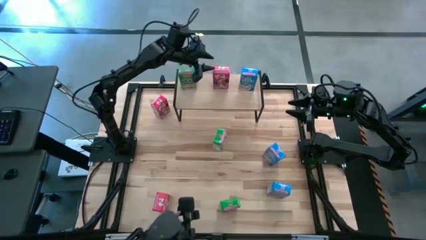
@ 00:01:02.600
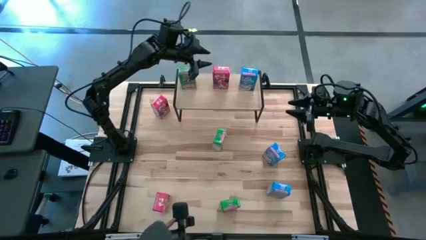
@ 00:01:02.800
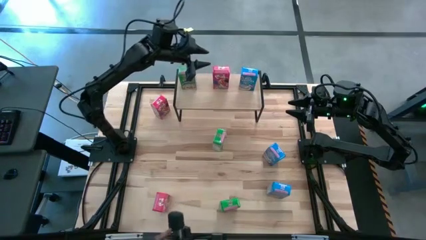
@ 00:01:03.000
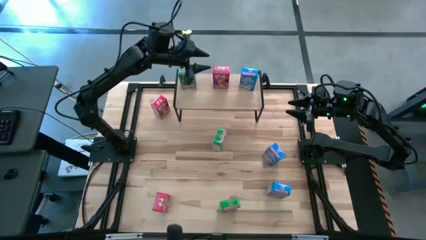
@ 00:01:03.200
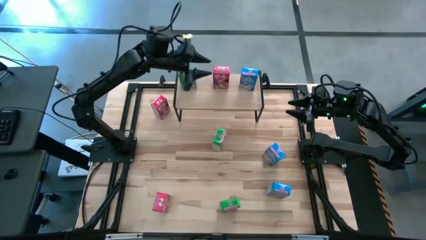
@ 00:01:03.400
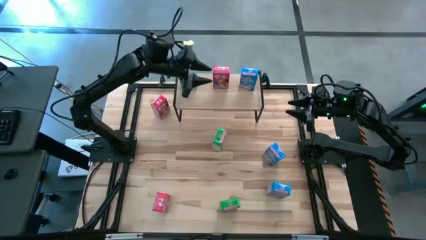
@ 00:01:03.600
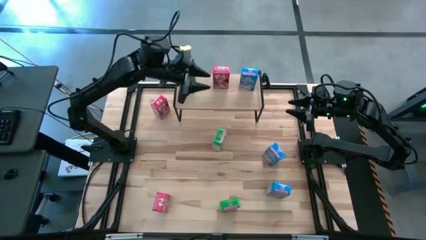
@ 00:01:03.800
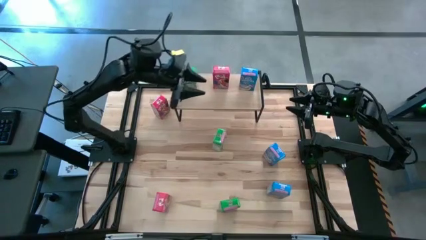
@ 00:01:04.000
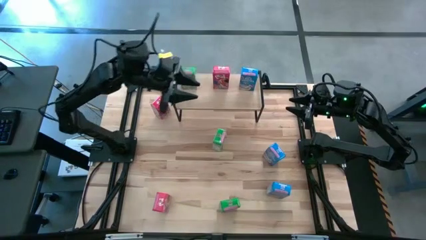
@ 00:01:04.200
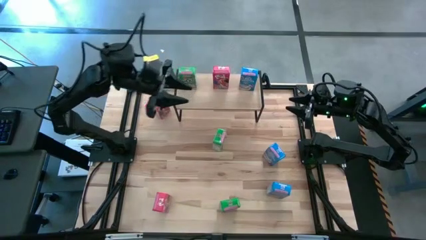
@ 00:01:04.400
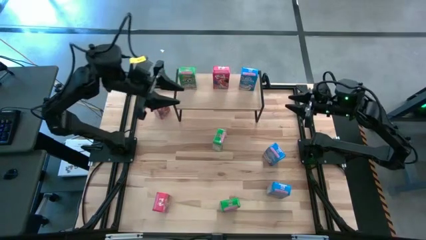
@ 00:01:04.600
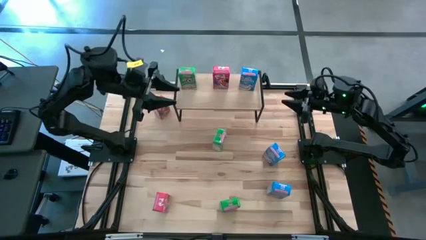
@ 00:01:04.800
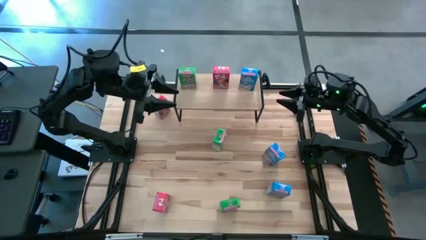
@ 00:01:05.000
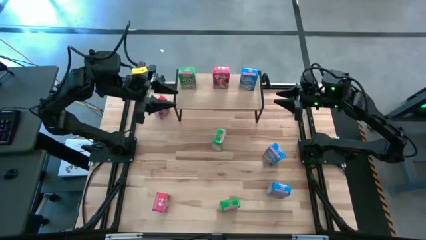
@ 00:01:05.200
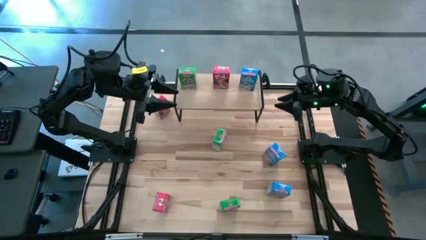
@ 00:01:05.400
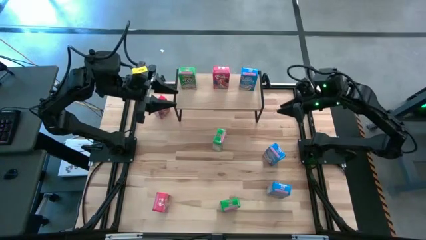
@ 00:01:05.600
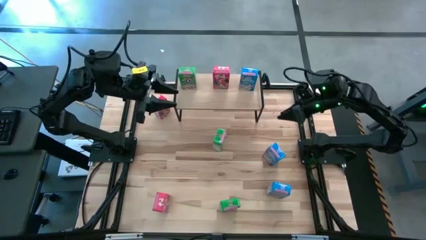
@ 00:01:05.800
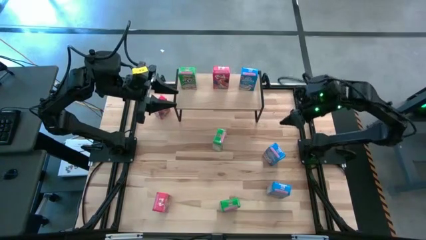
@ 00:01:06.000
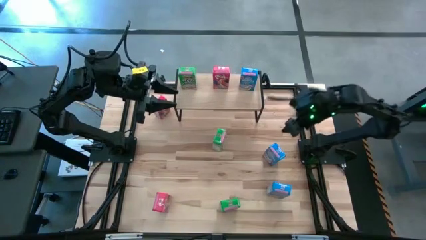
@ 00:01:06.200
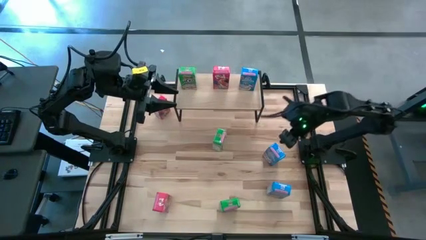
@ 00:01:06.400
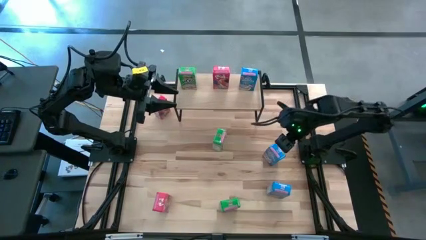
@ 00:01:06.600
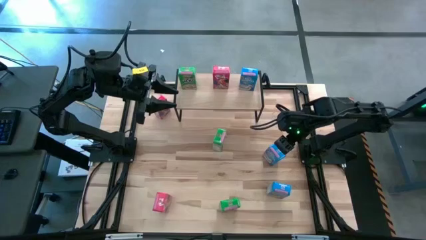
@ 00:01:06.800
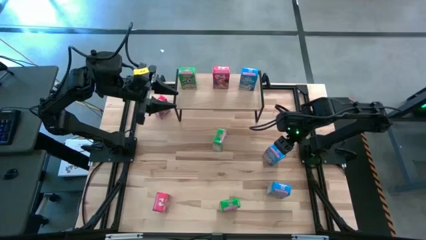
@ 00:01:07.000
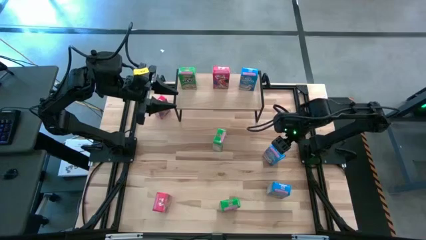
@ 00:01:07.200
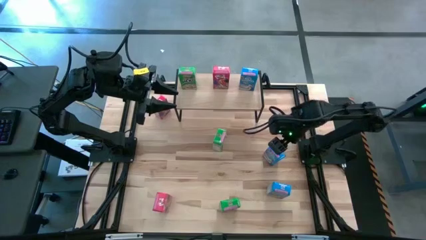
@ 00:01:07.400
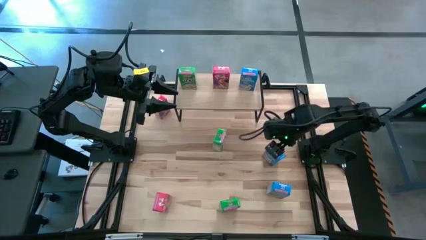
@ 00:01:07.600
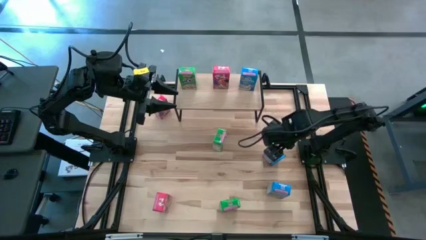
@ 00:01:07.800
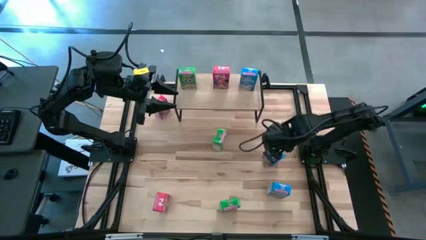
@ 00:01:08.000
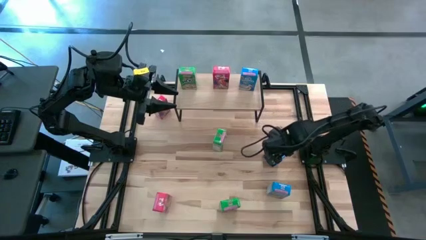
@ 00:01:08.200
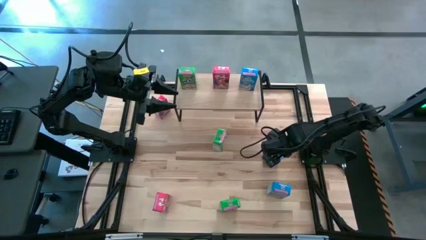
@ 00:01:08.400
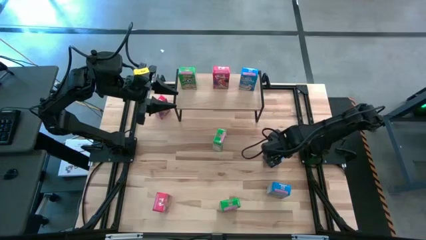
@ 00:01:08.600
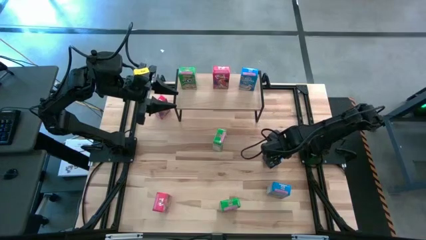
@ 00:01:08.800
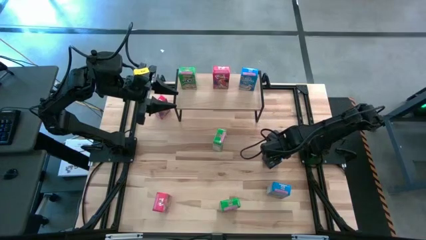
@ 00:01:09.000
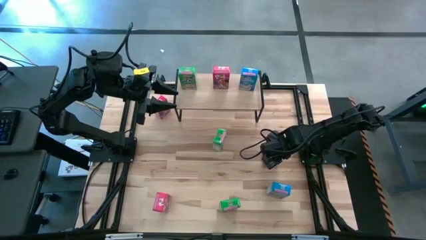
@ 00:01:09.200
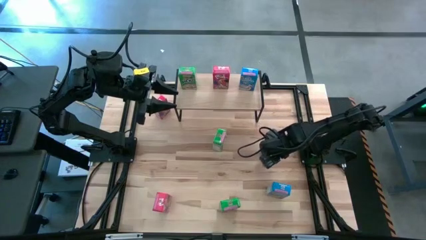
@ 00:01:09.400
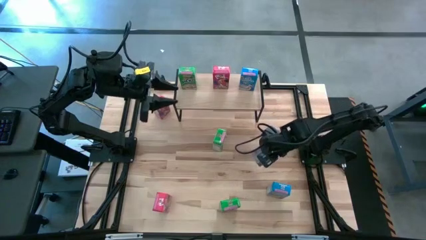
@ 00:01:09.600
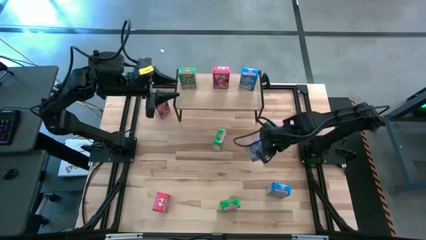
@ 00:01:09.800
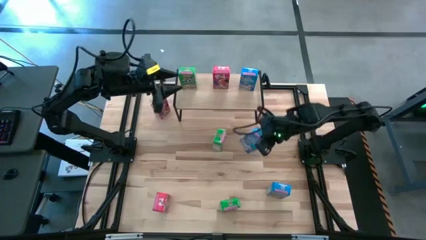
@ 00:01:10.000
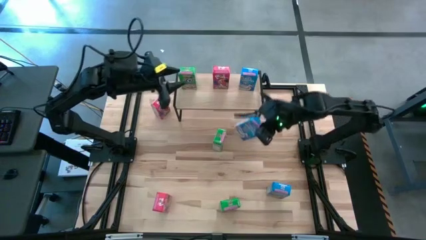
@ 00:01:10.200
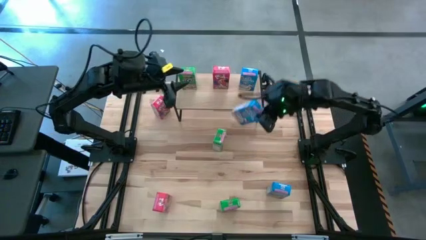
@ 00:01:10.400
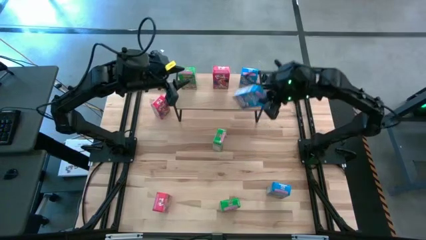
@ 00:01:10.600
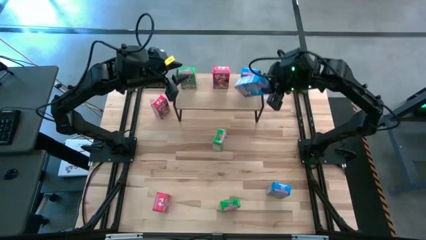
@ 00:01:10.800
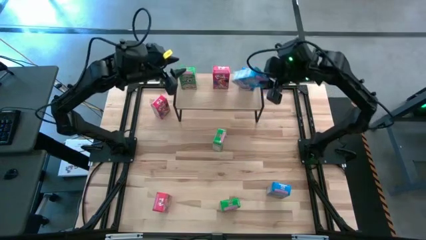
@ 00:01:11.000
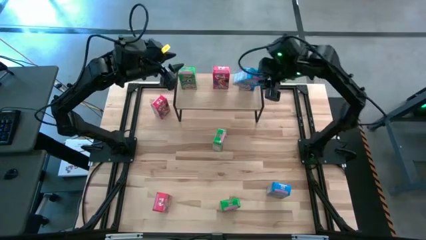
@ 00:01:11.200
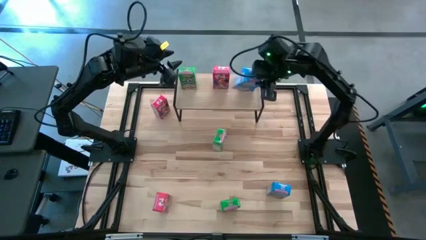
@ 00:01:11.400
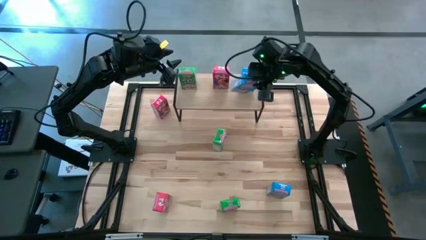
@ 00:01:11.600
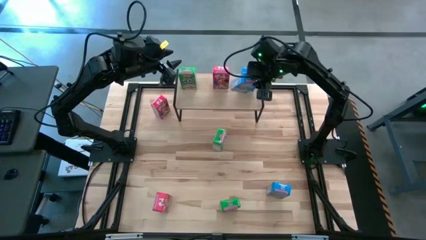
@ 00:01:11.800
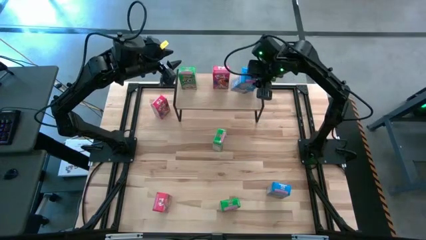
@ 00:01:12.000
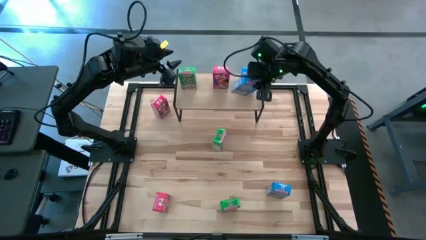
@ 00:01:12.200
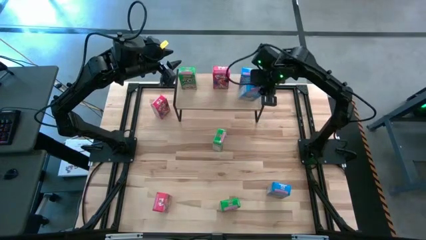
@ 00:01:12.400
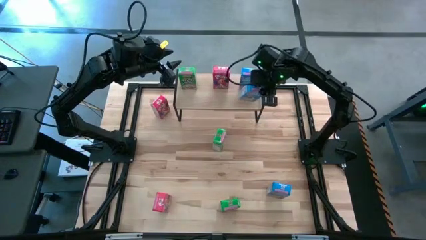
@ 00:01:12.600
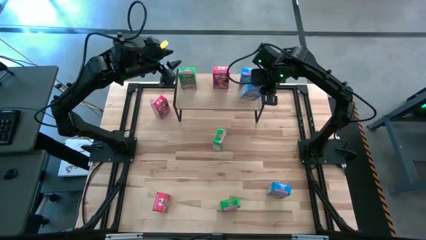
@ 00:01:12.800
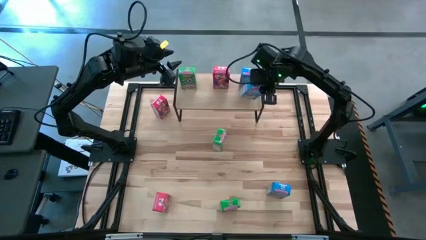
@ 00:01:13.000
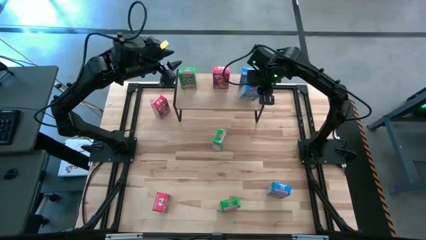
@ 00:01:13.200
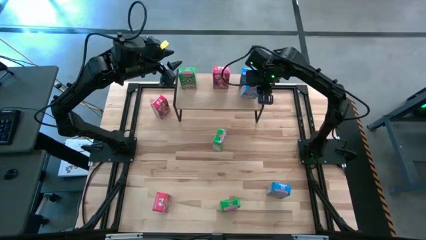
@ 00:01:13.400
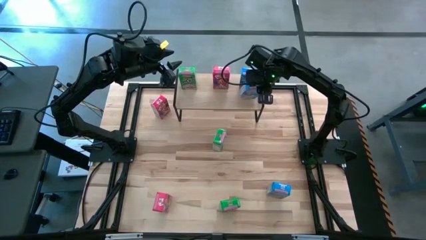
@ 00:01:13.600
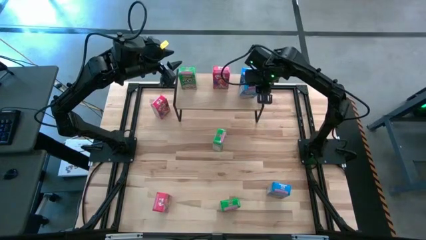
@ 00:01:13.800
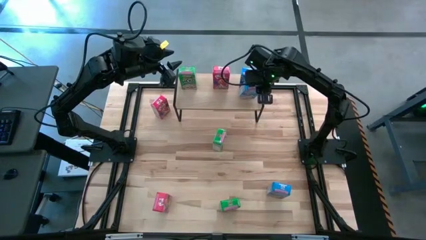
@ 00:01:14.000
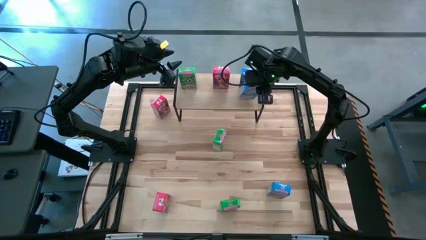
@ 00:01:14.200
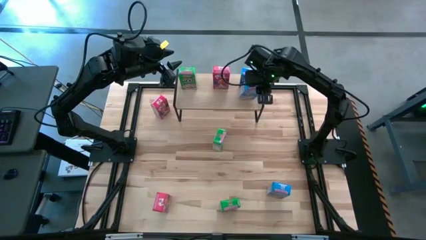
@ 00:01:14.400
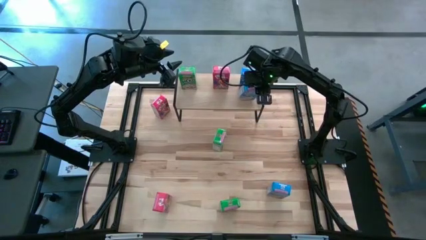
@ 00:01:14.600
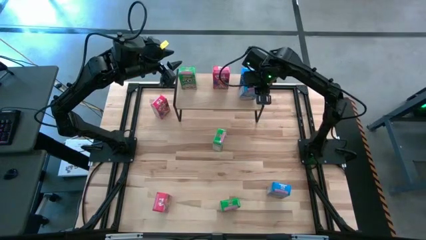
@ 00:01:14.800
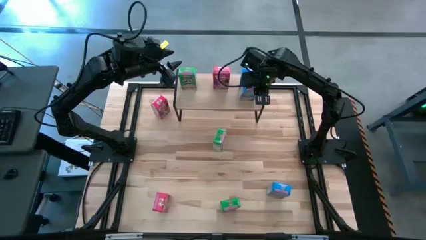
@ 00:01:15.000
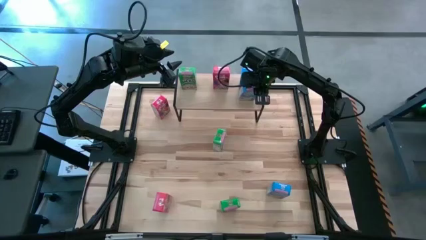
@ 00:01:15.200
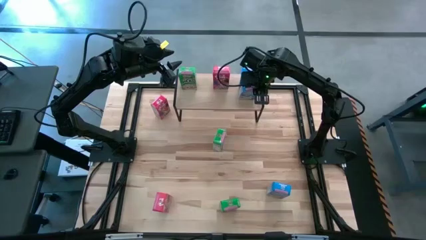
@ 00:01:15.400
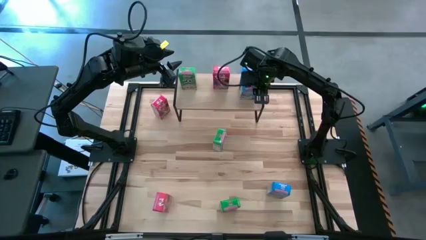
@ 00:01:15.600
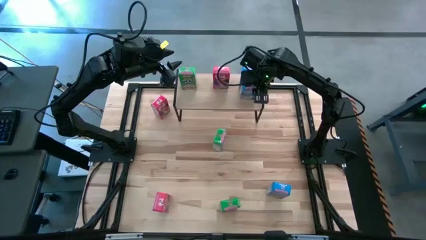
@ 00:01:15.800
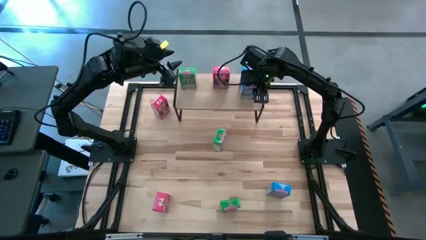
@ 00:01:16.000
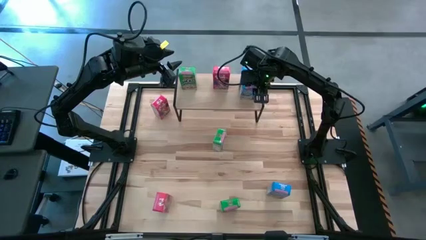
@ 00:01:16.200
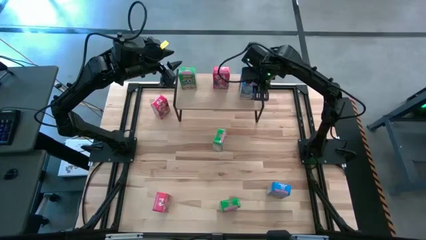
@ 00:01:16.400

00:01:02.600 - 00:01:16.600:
Task: Stack cereal on shelf
Put the top blue cereal box on the shelf aligned with the other blue cereal box
